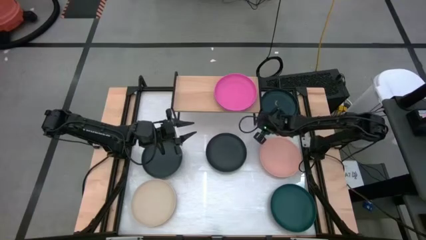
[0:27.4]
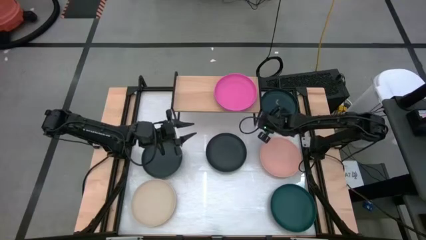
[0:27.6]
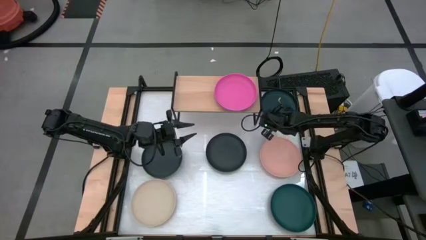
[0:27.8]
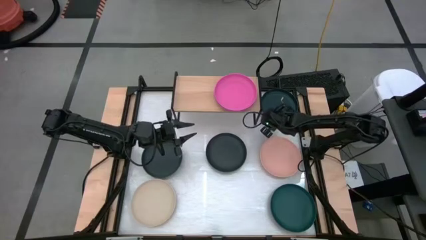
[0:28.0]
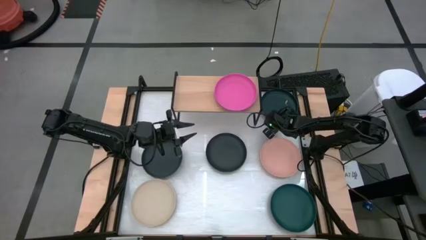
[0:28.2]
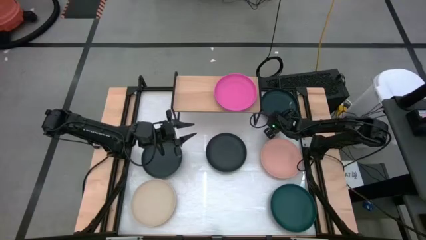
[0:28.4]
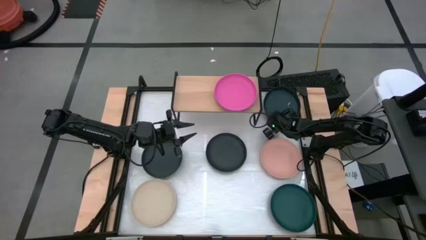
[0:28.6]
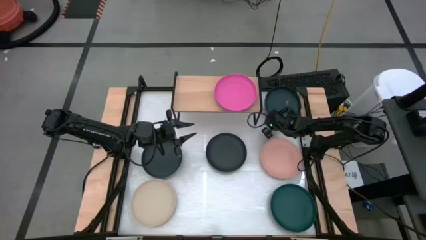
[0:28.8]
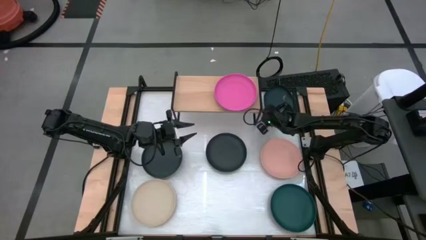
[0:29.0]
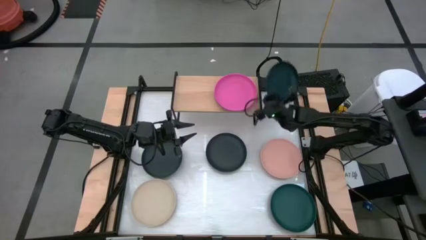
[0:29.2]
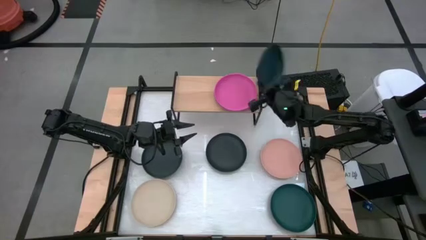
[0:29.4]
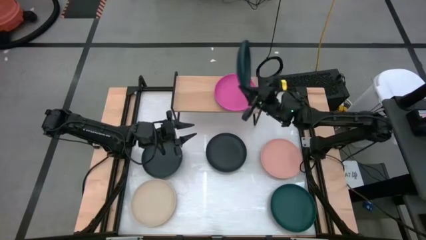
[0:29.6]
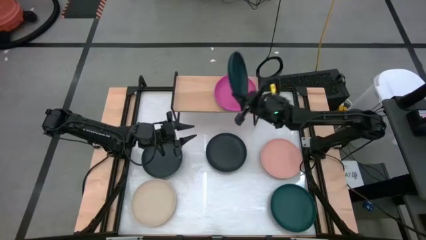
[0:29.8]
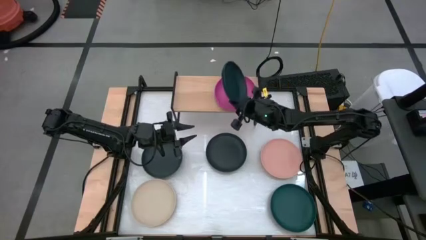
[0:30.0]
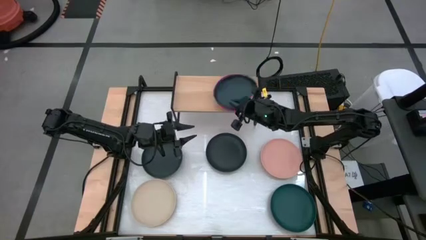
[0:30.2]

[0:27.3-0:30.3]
Task: Place and stack plates onto a shelf
Stack the top dark green plate on top of the pink plate on the shelf

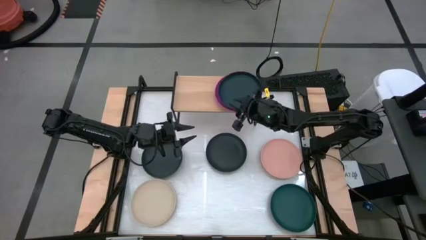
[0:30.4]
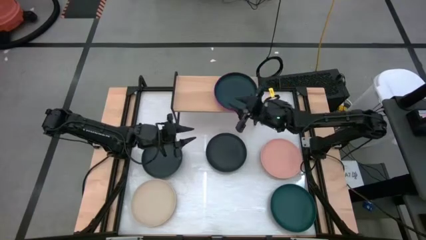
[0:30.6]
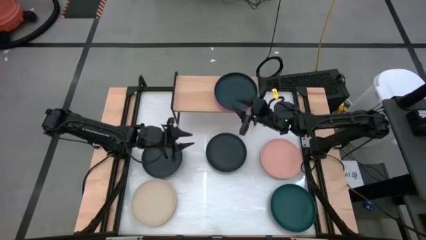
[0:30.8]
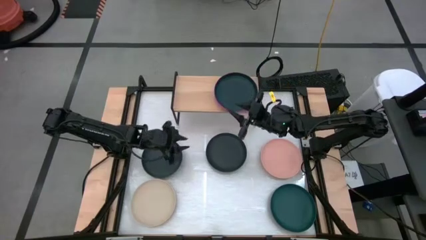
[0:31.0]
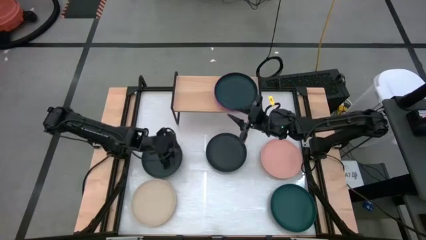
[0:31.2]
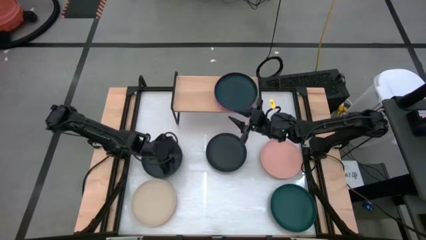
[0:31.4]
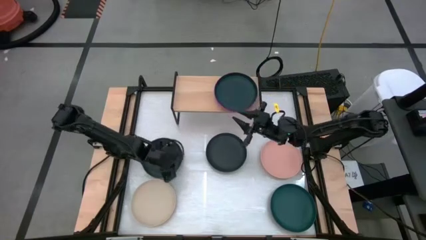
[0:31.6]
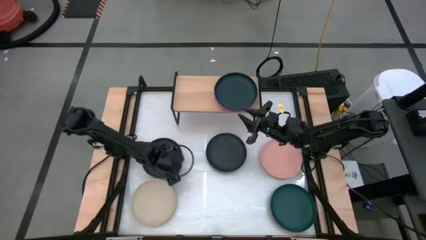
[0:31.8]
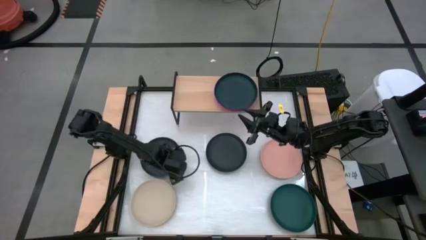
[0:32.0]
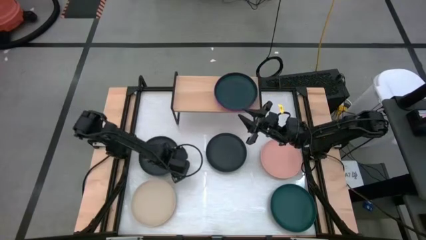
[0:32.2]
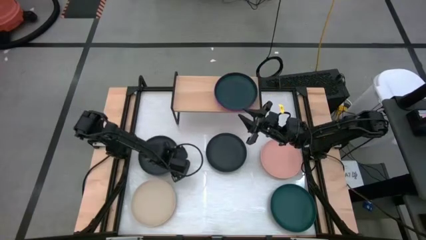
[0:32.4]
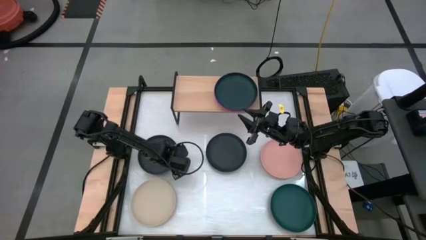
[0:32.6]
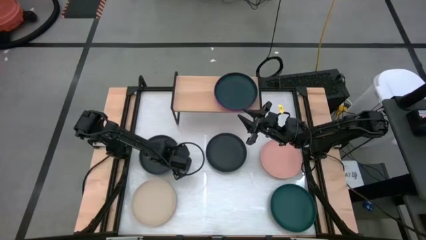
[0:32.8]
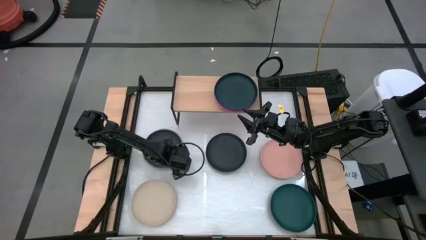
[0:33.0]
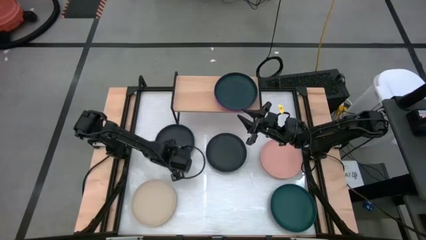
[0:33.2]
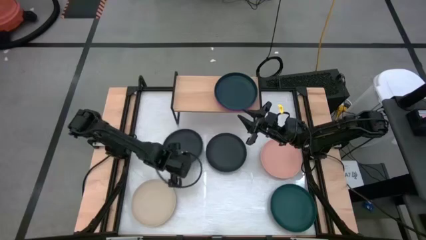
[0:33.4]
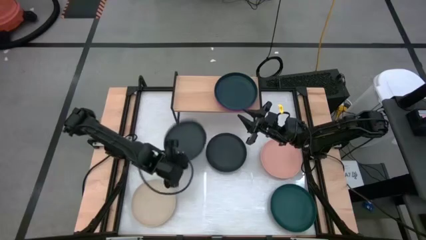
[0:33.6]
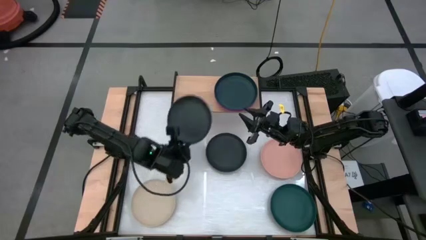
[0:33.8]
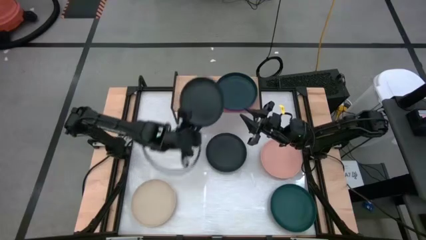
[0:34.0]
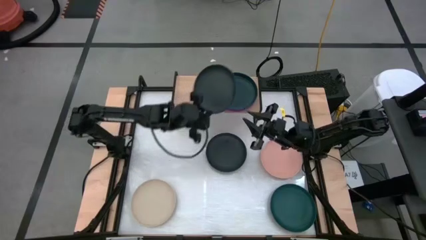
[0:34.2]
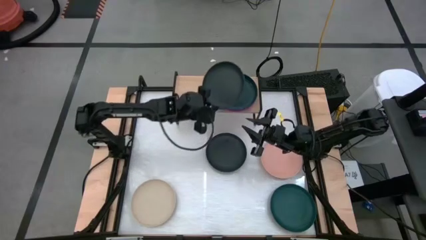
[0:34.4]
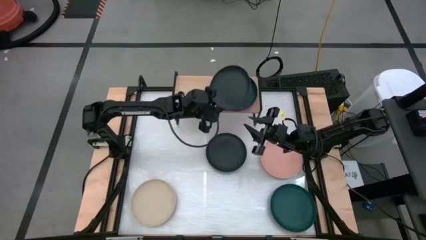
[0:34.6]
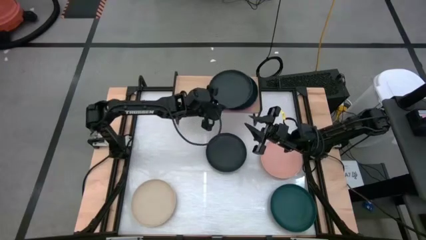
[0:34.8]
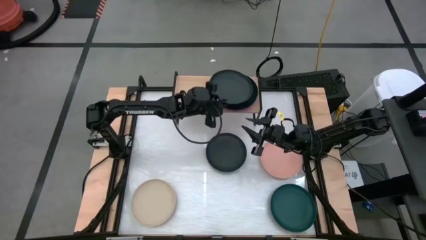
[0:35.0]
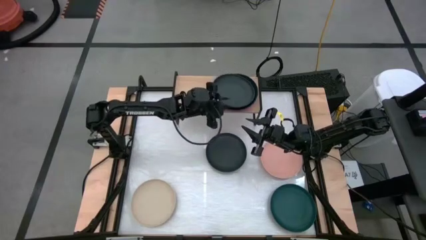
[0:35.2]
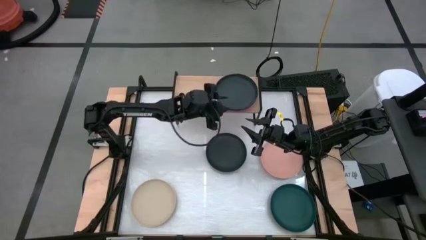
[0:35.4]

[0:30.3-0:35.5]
Stack the left black plate on top of the blue plate on the shelf

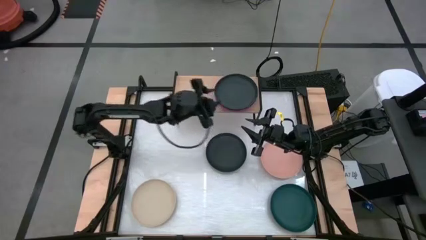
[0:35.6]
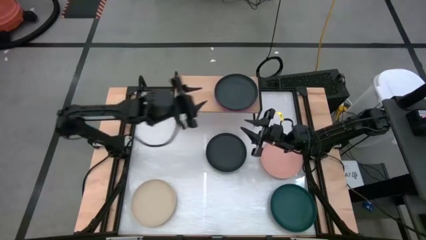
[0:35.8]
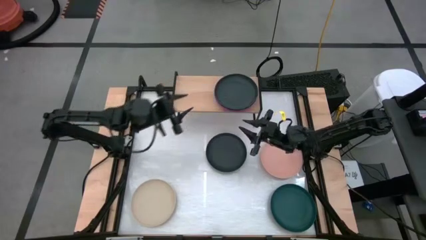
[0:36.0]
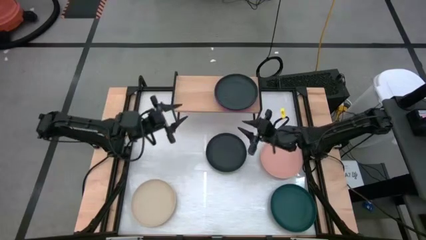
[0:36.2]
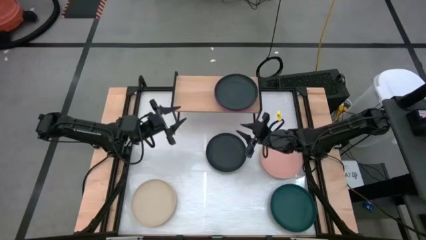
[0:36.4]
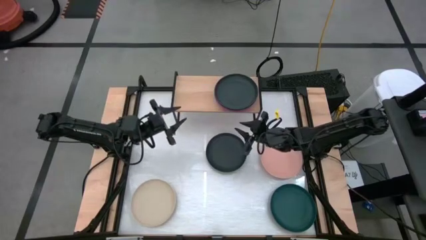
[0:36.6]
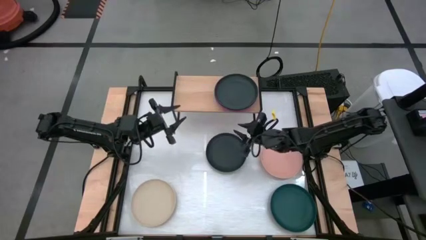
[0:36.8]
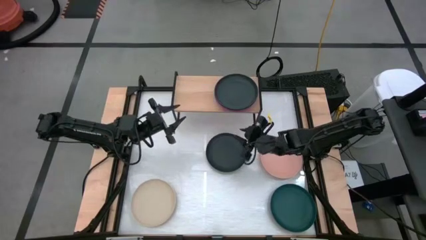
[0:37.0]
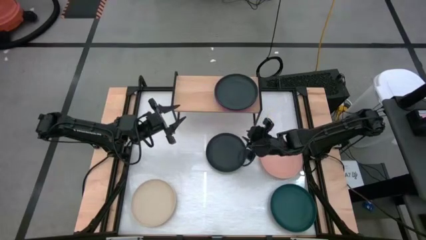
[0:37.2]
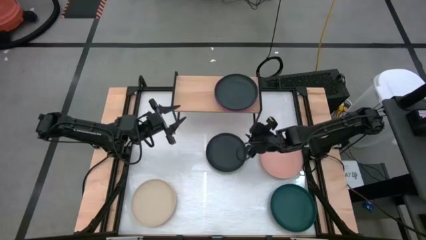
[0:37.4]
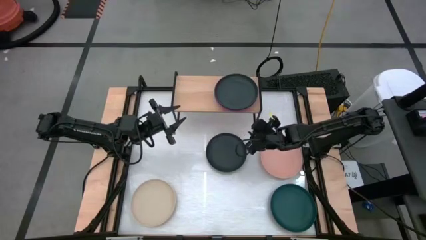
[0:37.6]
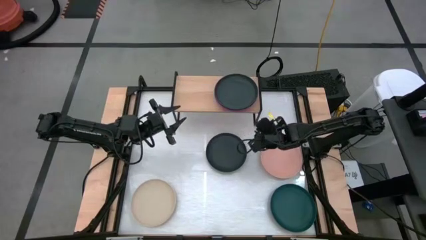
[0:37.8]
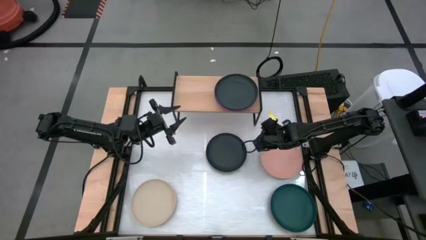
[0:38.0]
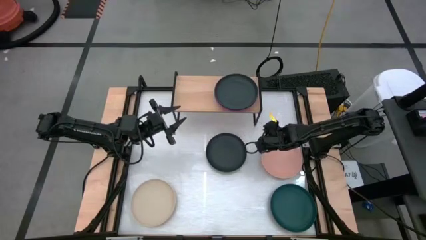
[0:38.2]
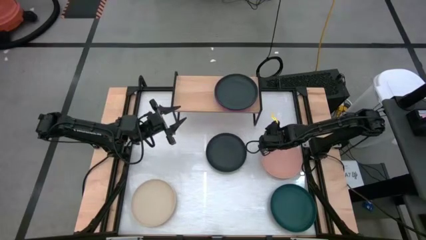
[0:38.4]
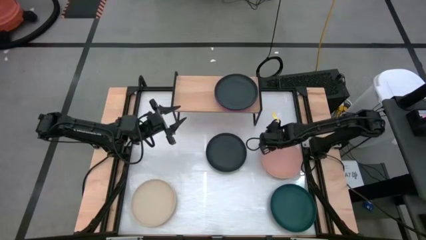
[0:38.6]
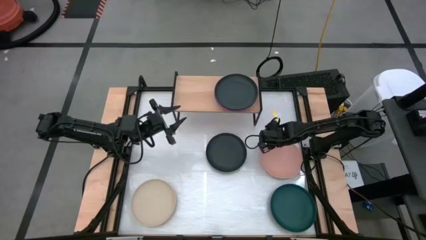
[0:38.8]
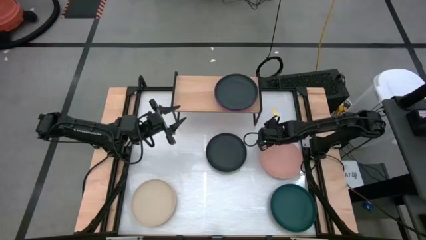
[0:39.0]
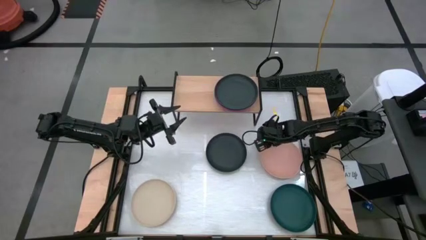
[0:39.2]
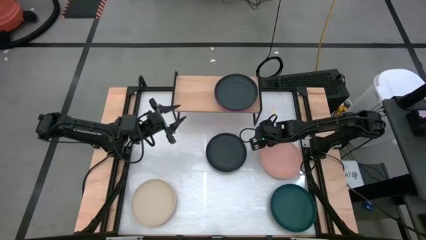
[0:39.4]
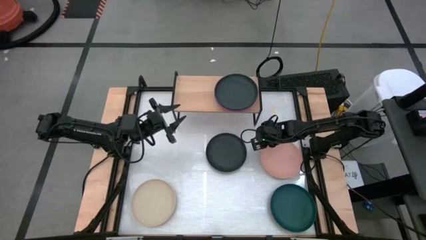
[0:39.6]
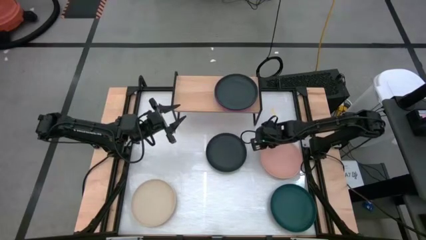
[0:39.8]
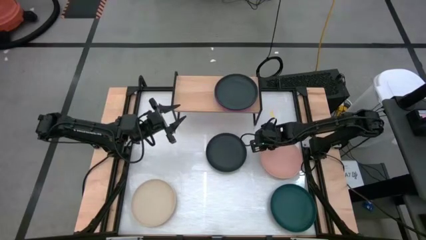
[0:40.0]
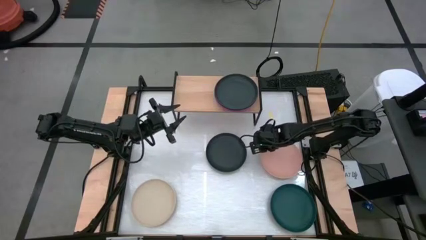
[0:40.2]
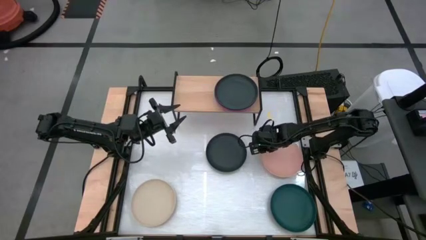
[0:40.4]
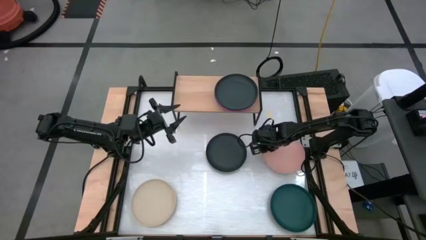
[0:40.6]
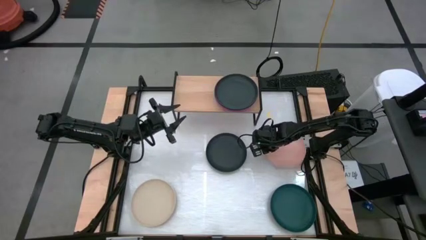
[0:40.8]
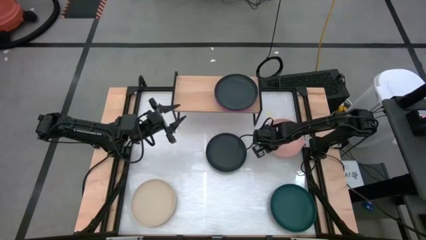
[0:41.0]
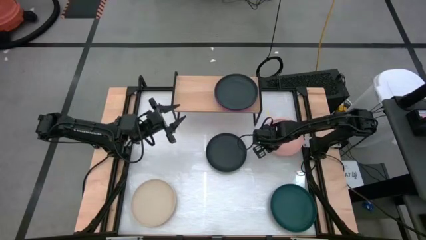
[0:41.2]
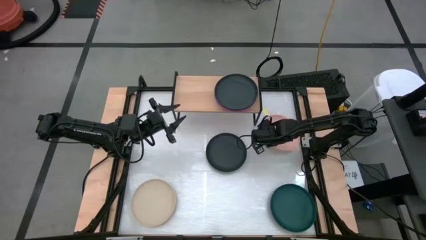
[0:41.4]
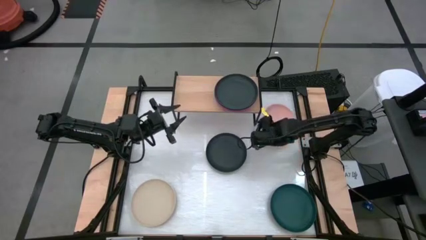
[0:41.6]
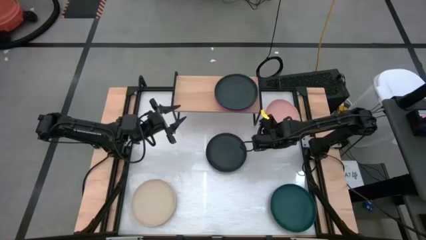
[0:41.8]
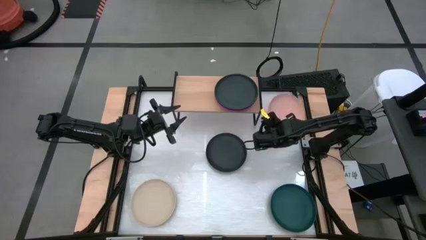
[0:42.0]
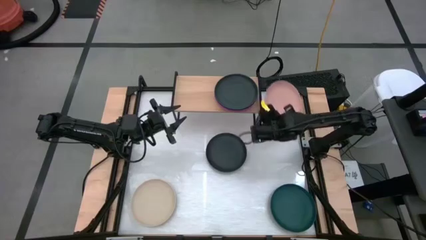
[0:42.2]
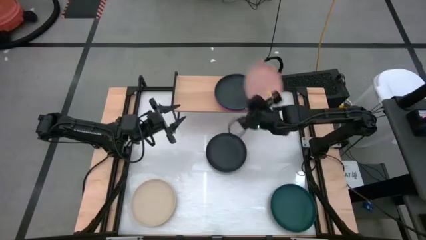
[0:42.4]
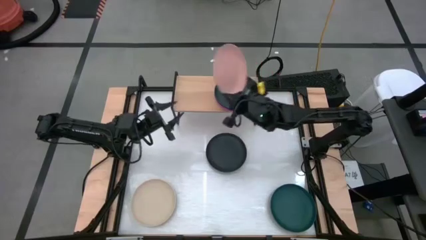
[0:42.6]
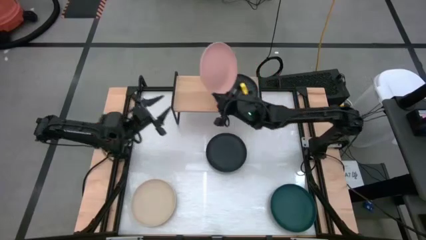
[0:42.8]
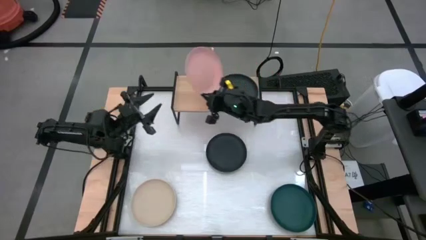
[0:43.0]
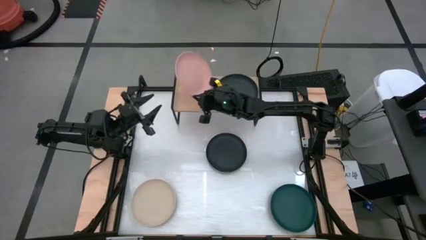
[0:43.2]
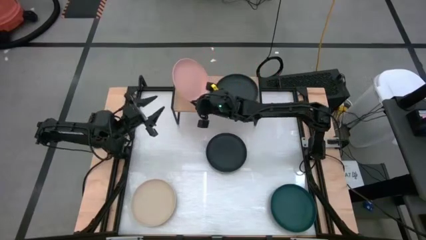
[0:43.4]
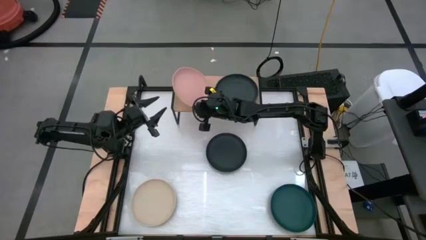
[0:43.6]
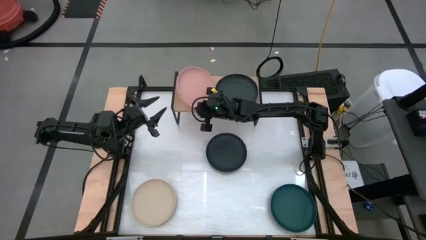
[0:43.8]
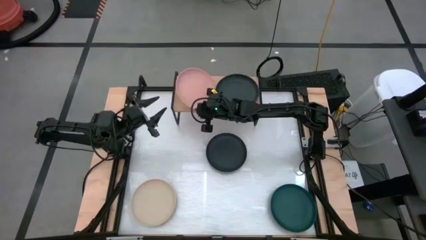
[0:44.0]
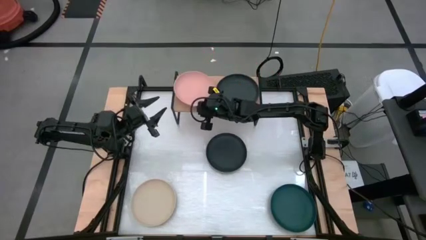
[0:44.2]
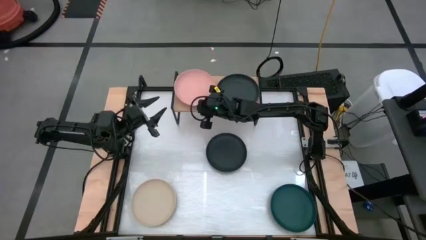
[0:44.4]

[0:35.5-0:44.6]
Put the light pink plate on the shelf
